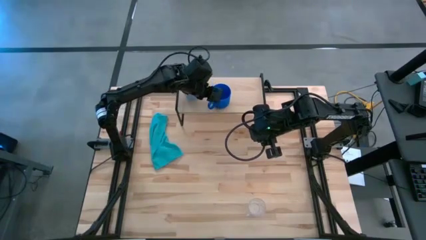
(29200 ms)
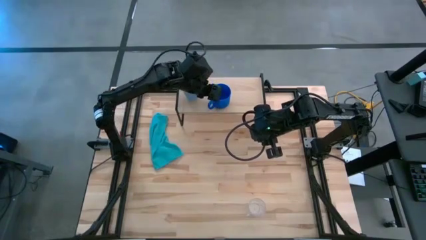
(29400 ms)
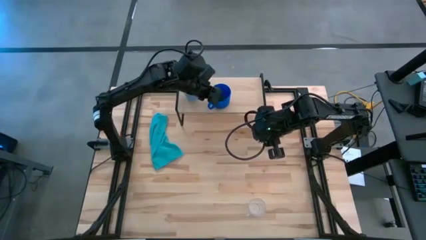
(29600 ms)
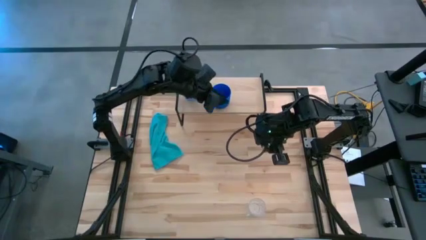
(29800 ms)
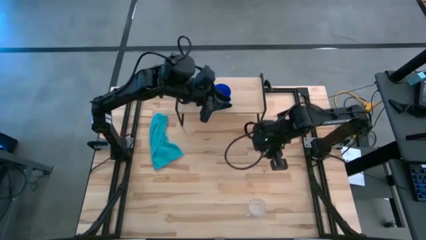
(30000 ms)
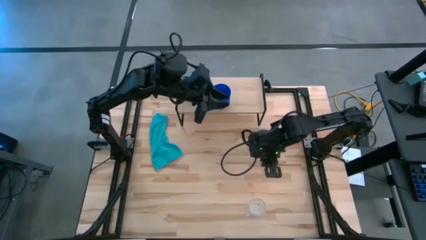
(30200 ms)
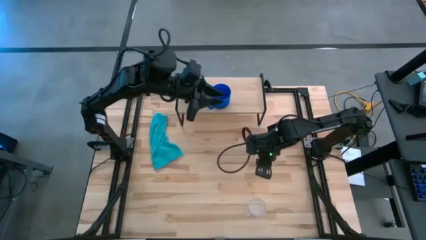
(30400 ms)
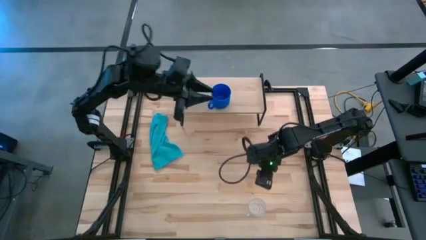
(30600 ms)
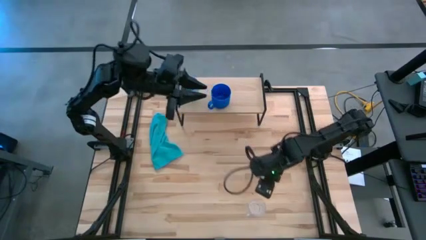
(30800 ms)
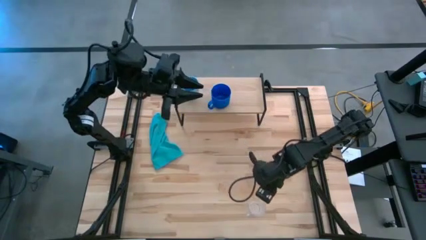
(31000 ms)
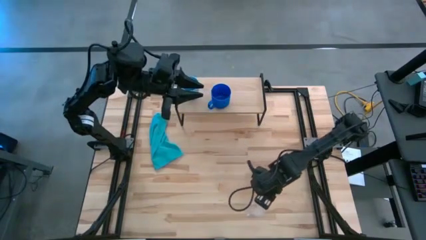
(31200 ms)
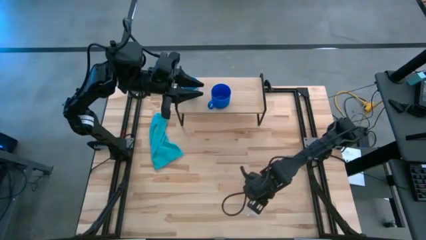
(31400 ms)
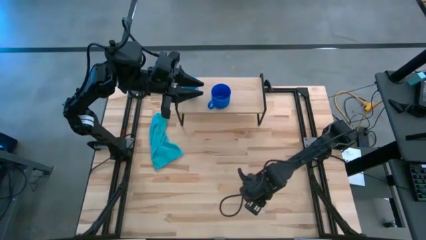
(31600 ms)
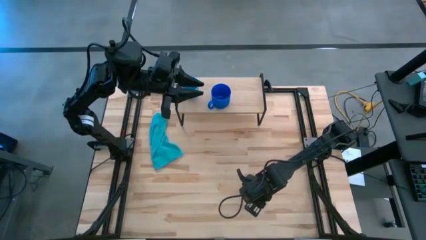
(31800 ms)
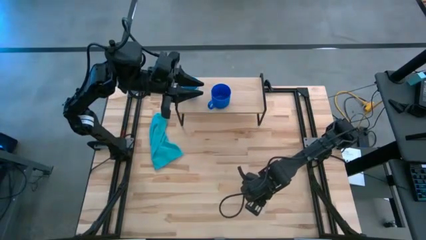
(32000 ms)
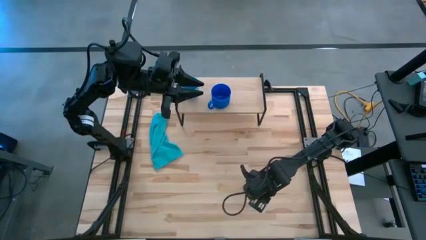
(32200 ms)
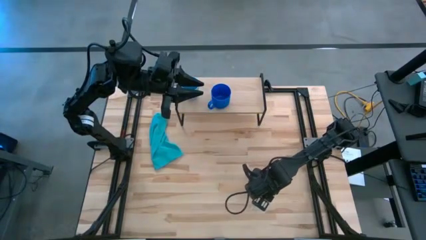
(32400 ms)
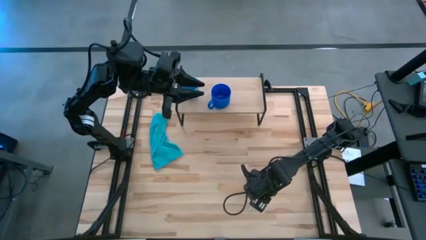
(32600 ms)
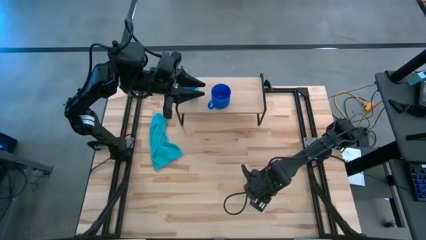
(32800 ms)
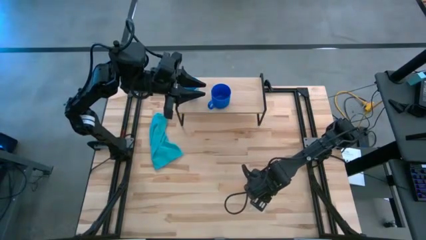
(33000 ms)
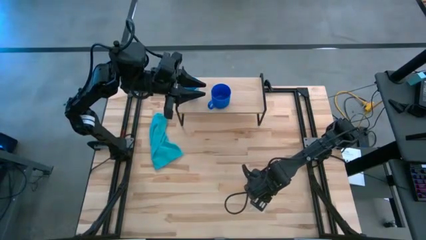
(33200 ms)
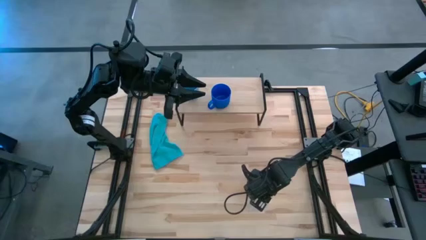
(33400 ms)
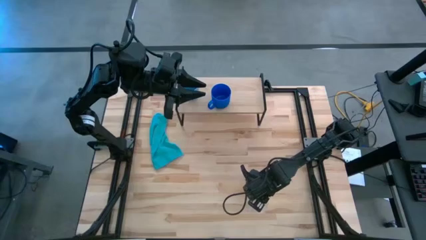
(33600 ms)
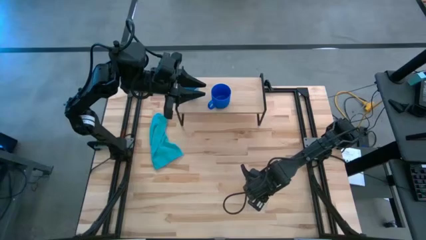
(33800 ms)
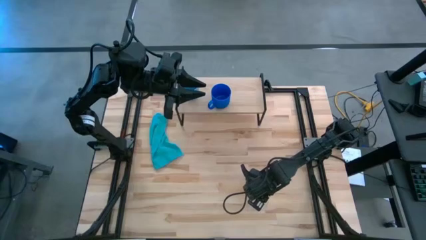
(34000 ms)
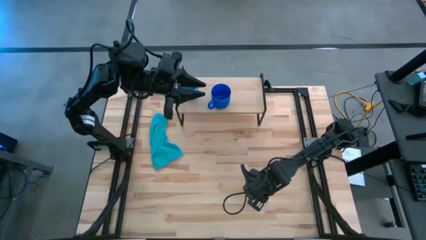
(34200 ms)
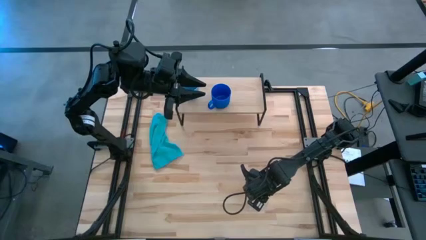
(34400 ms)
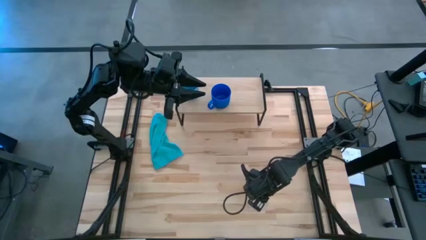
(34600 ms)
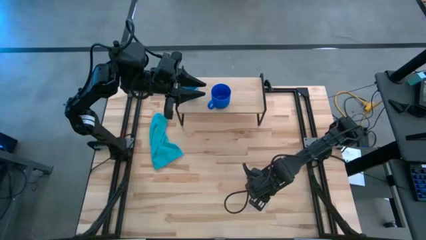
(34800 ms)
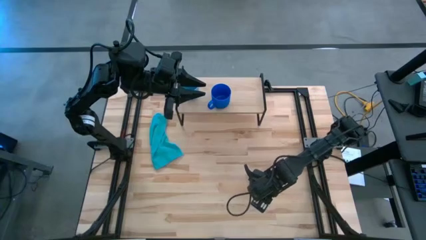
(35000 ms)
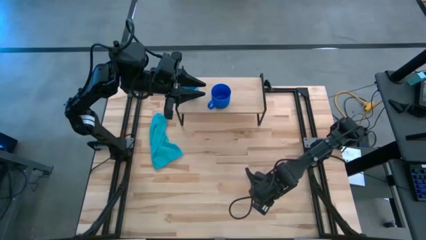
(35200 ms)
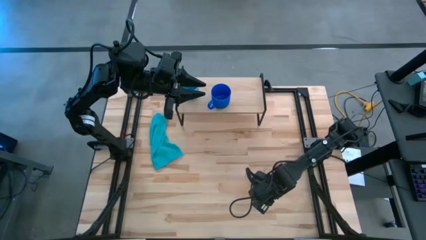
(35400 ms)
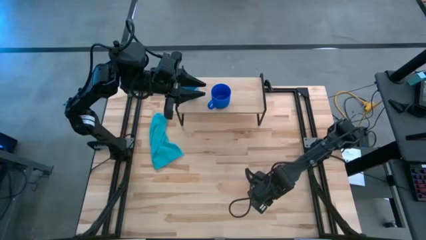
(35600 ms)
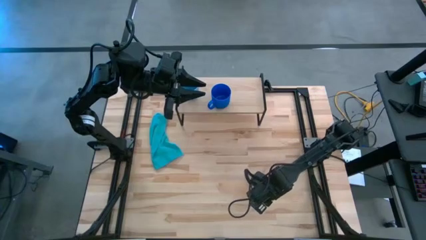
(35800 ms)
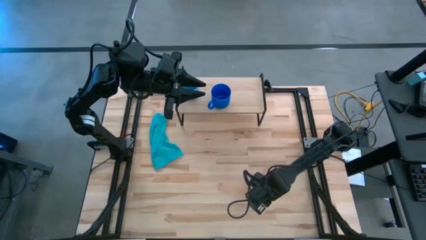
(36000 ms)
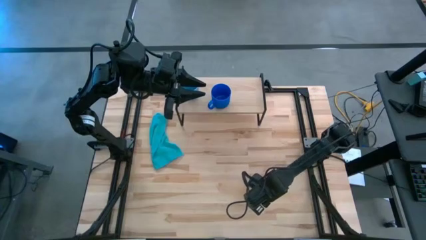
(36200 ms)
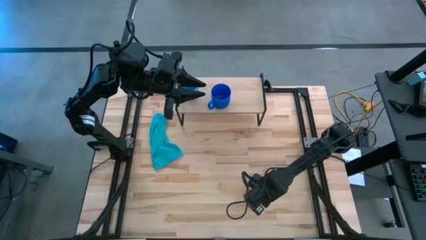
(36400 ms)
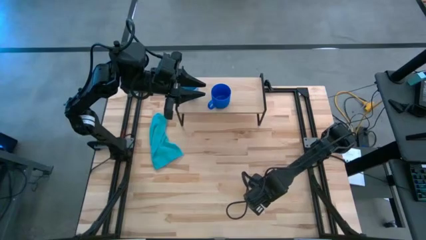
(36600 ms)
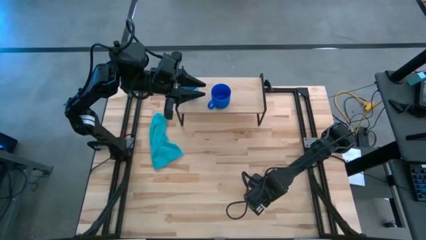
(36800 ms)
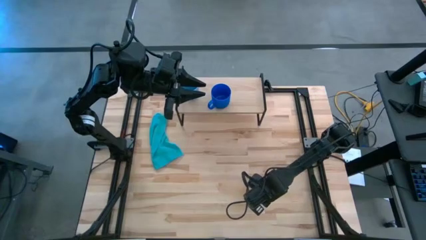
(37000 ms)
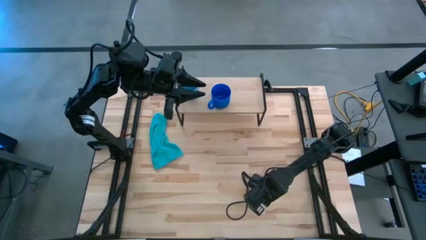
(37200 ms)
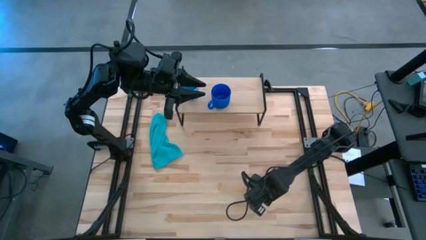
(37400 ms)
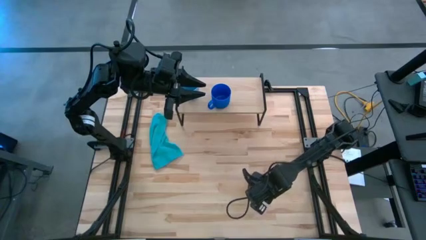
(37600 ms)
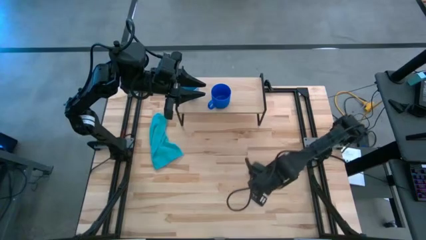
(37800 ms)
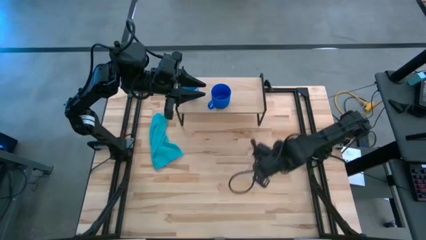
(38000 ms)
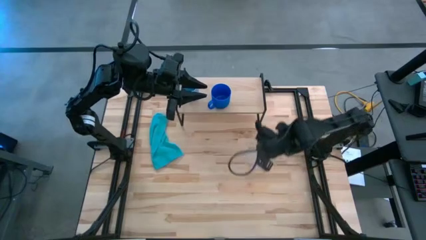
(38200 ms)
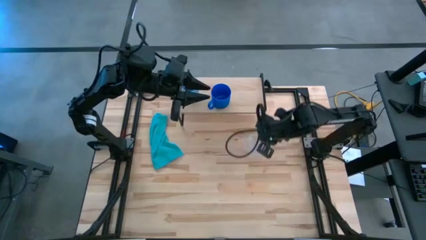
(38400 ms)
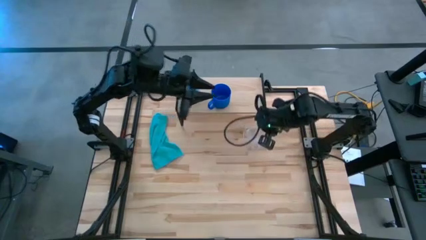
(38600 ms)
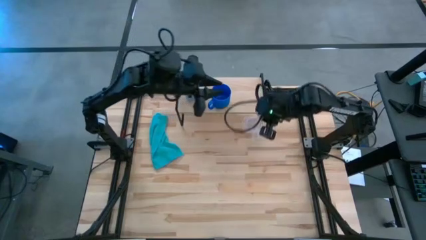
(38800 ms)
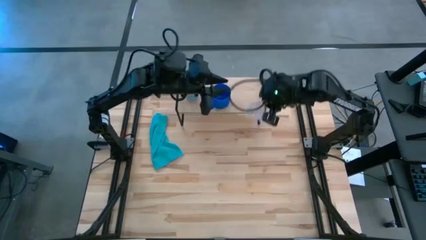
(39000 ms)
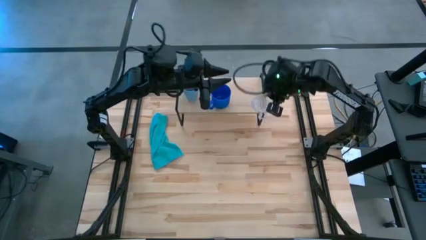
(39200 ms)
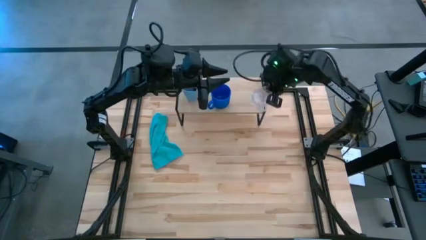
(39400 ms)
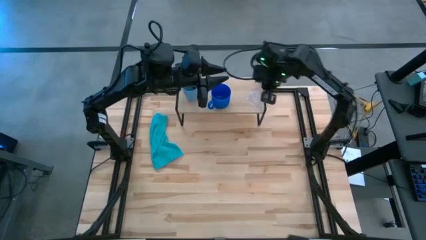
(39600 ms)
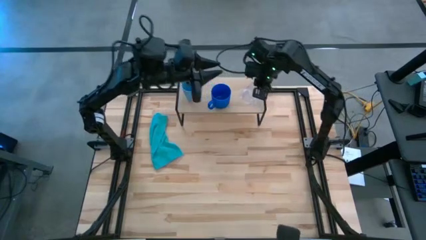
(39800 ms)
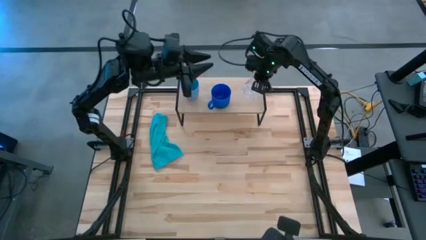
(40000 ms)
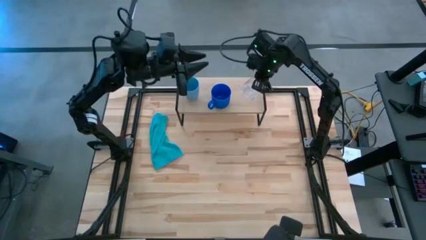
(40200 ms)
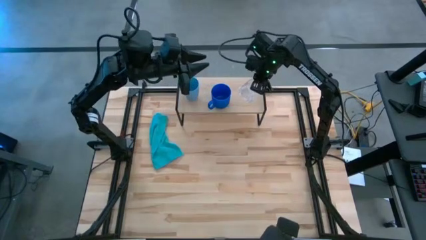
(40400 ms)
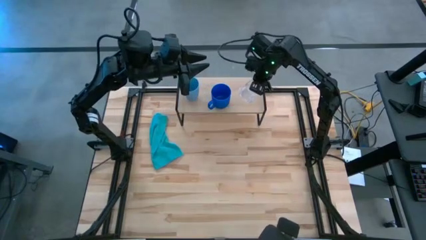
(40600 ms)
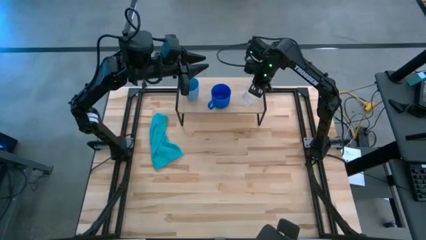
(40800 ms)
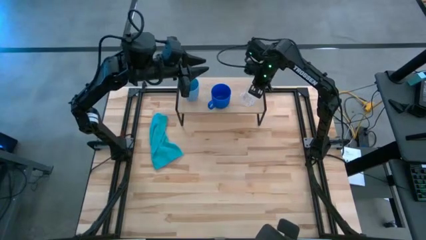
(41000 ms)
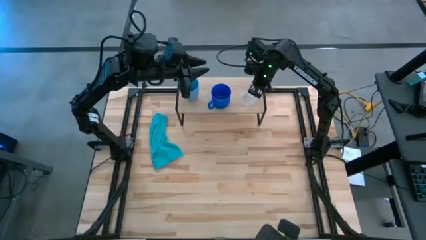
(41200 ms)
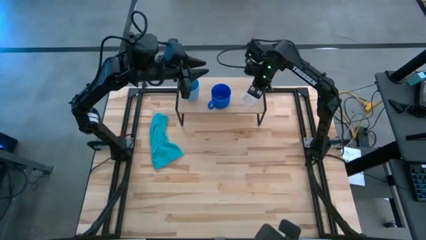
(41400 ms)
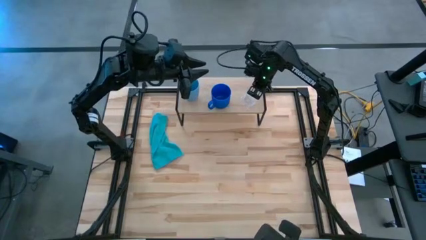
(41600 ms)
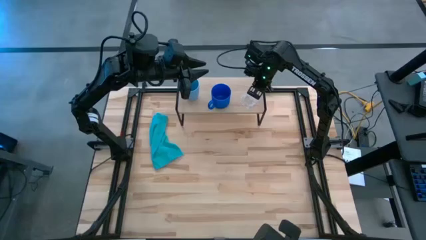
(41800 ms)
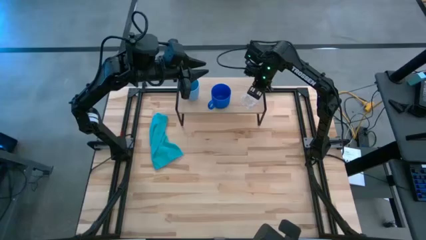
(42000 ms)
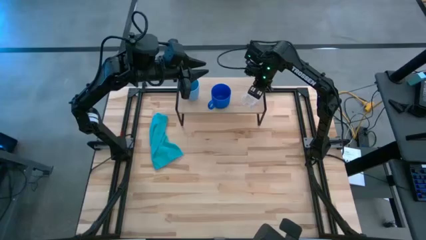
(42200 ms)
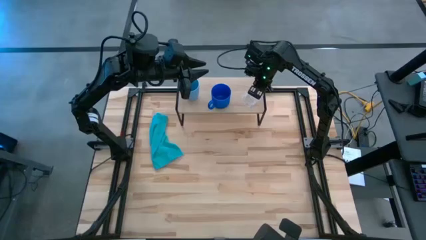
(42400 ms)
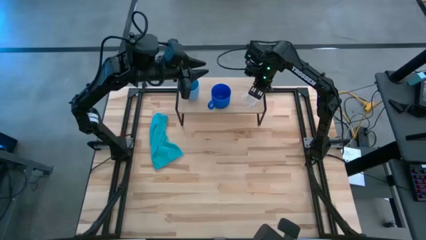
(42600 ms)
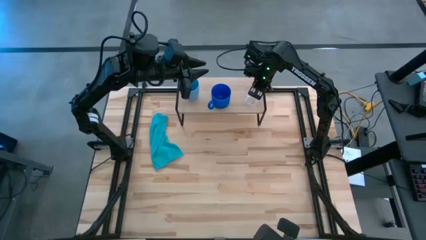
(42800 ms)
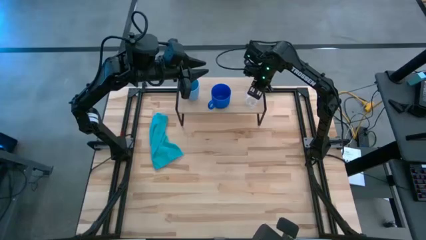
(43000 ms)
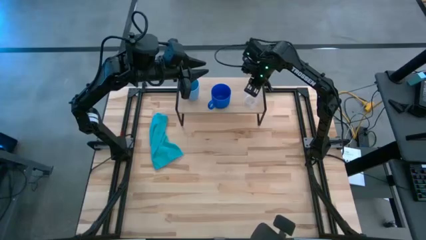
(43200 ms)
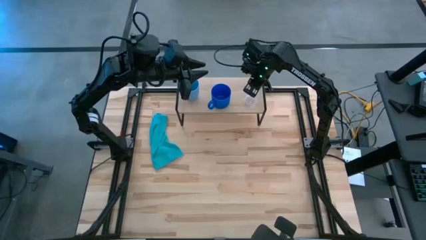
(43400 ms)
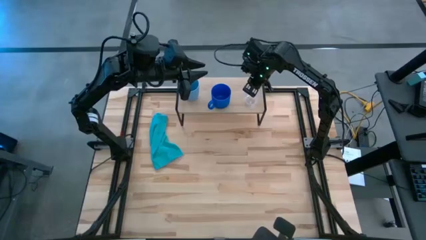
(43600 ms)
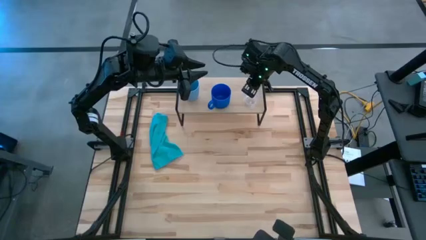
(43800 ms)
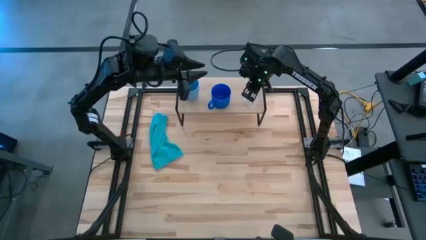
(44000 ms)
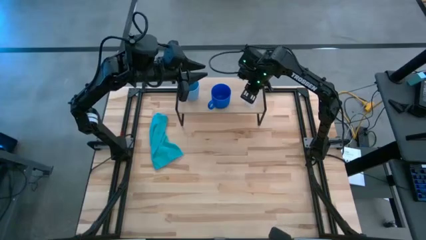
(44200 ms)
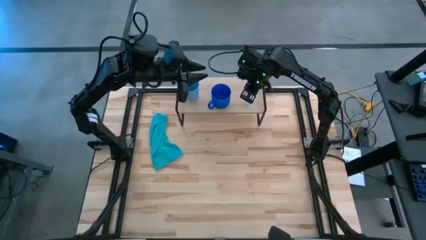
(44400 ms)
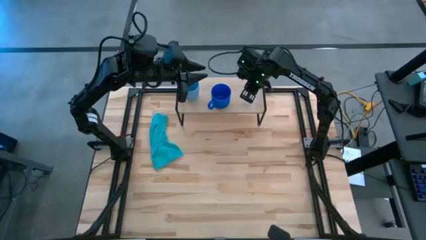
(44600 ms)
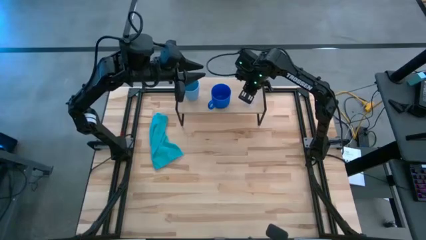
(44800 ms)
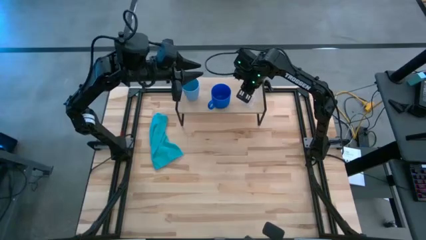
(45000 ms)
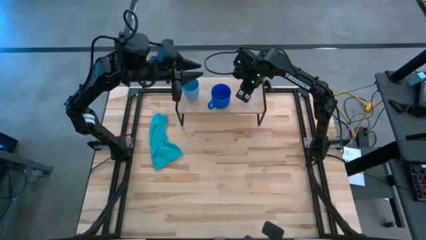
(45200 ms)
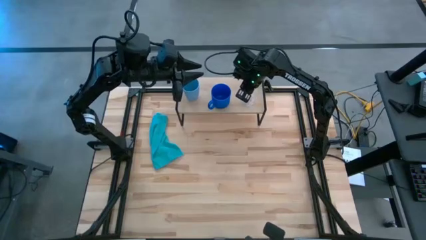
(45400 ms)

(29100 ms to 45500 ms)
Task: Stack small to large cups/mugs on shelf
Put the transparent mug on the shelf

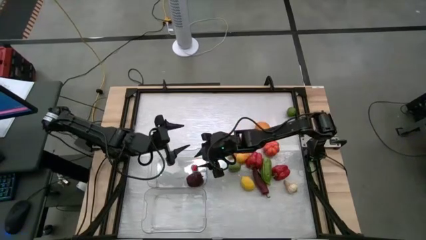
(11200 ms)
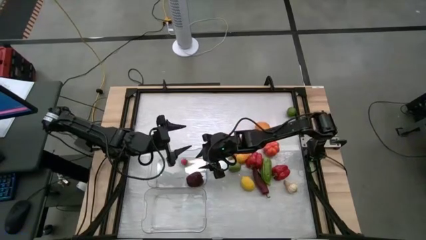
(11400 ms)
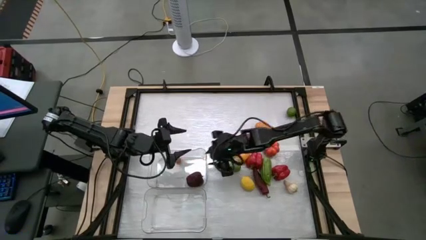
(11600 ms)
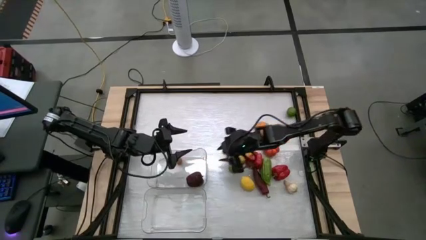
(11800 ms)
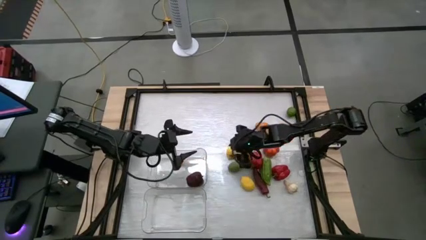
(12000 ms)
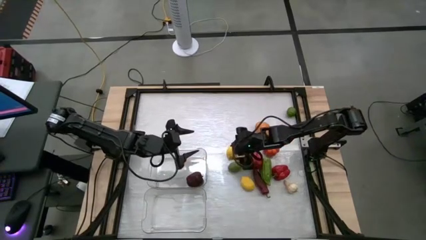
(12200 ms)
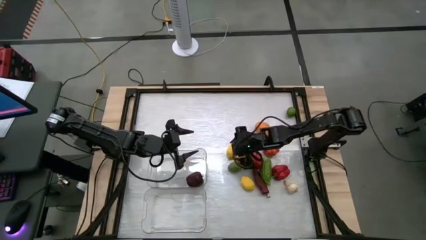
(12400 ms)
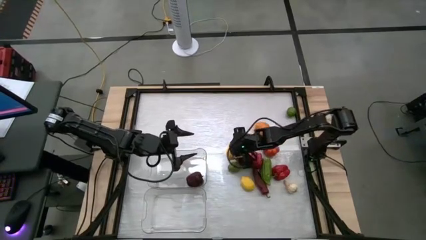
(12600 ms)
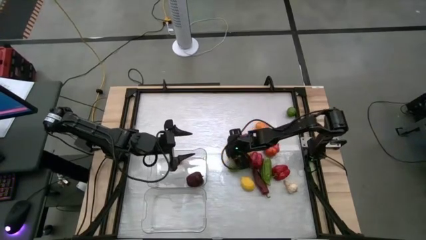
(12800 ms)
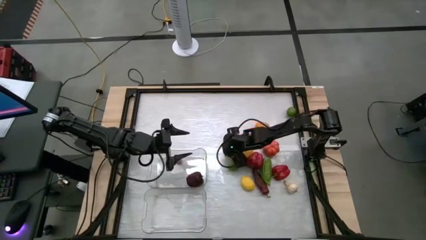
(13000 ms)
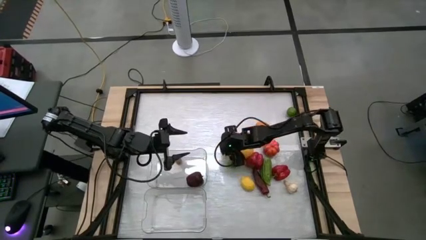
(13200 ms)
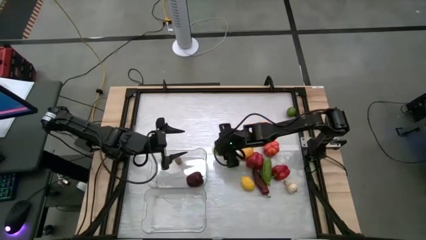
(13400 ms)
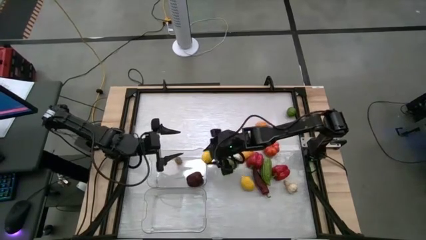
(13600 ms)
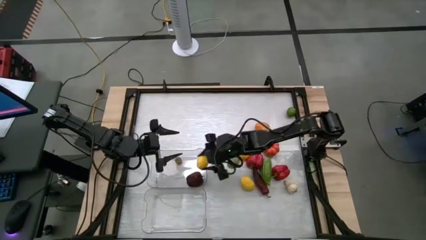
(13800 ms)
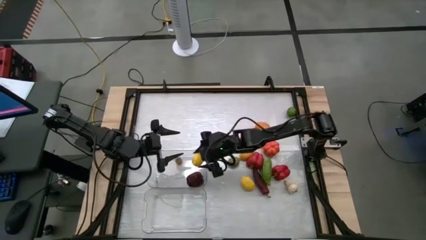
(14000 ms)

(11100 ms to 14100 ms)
Task: Sort produce into baskets
Put the left yellow lemon into the top transparent bin
